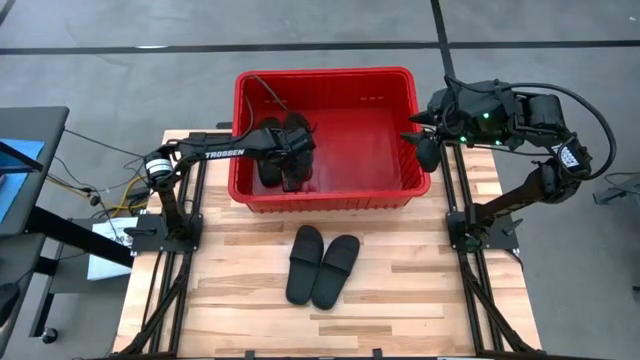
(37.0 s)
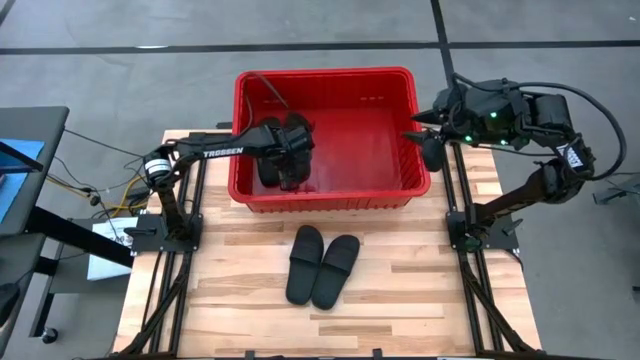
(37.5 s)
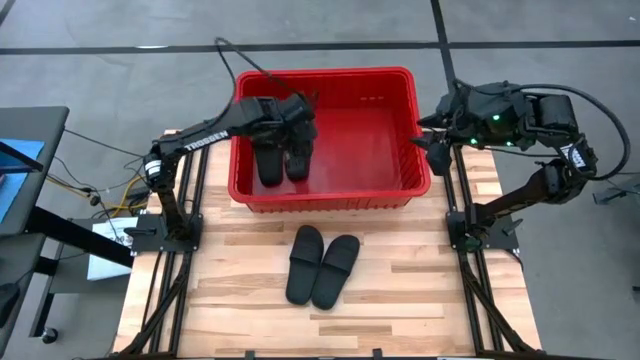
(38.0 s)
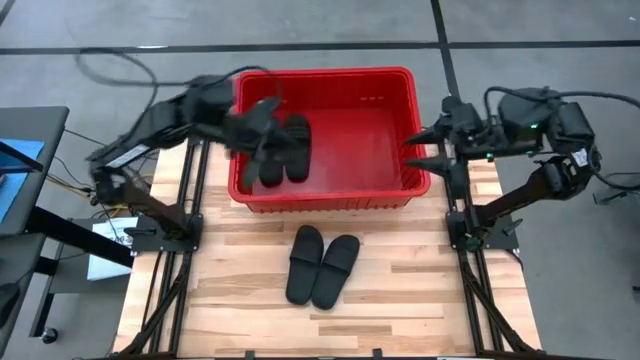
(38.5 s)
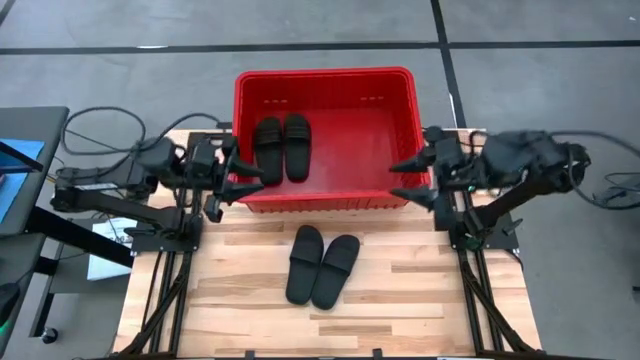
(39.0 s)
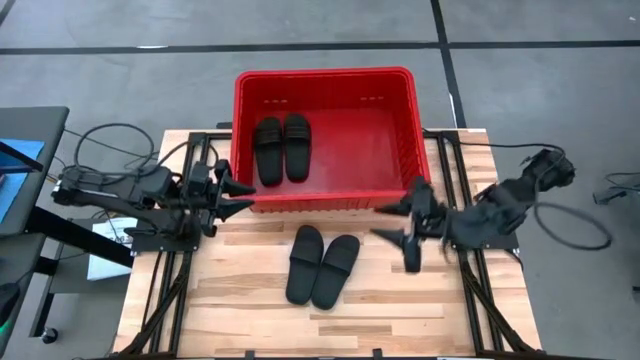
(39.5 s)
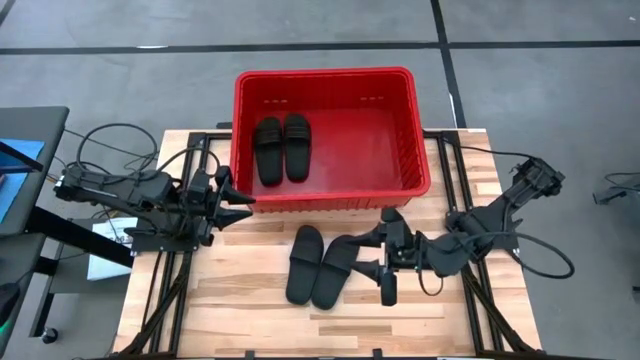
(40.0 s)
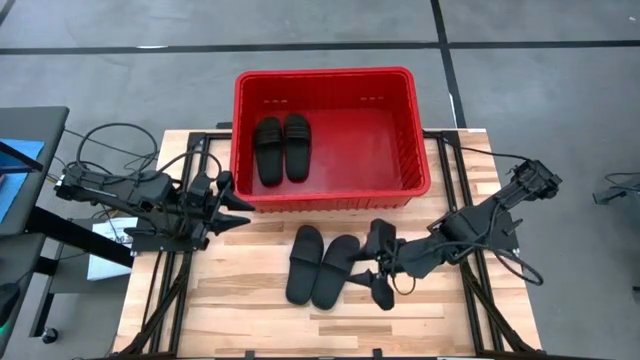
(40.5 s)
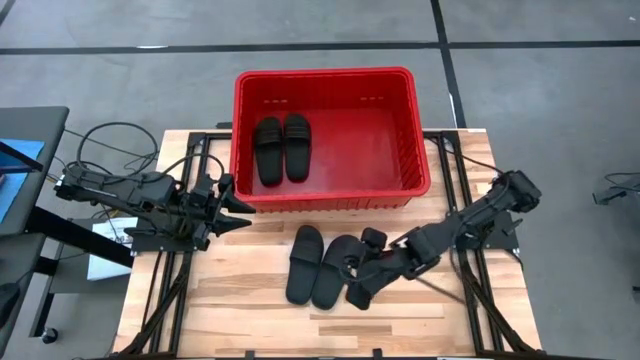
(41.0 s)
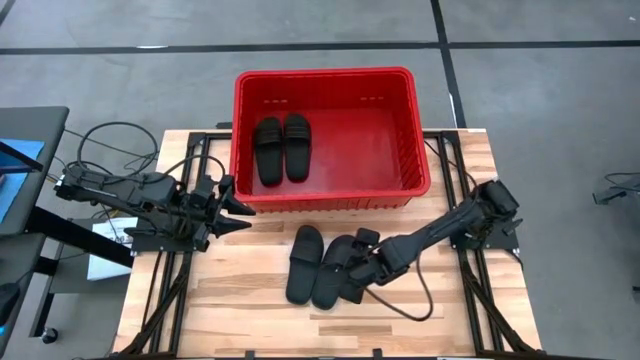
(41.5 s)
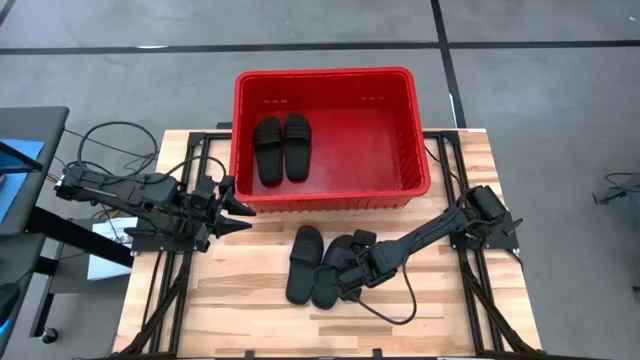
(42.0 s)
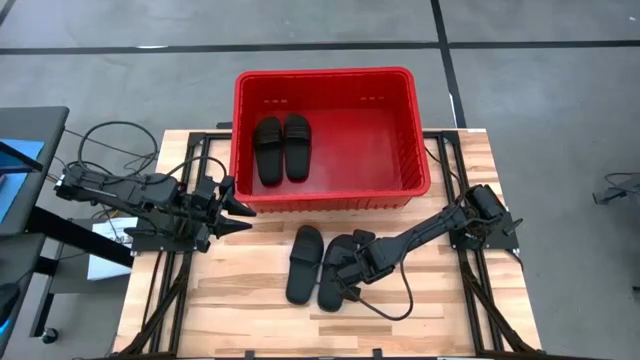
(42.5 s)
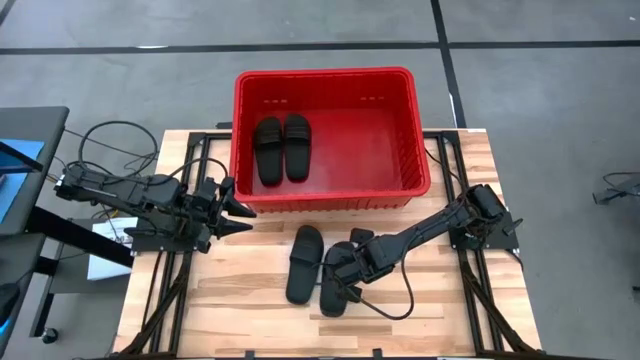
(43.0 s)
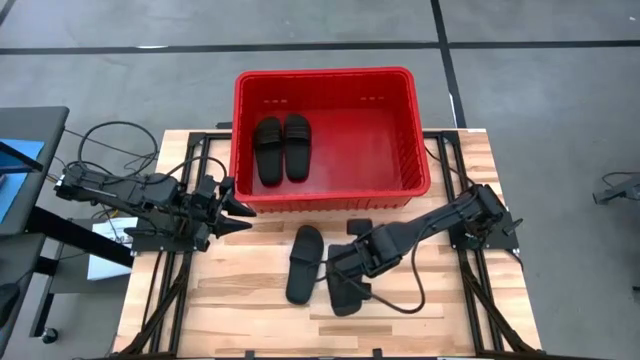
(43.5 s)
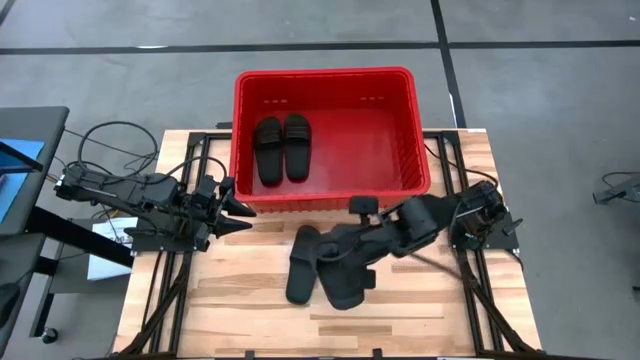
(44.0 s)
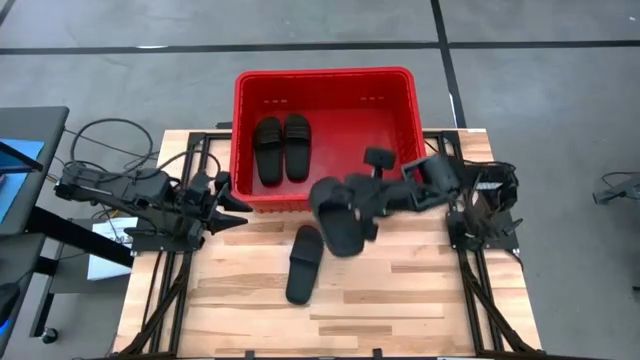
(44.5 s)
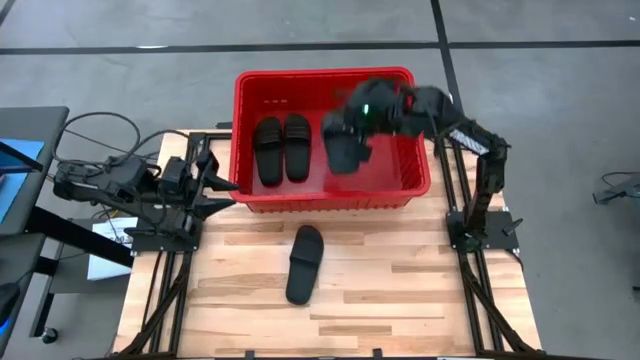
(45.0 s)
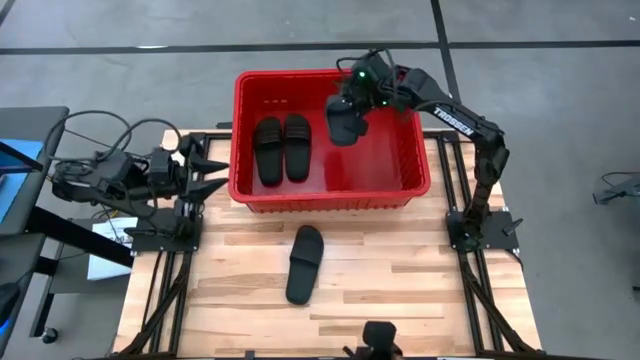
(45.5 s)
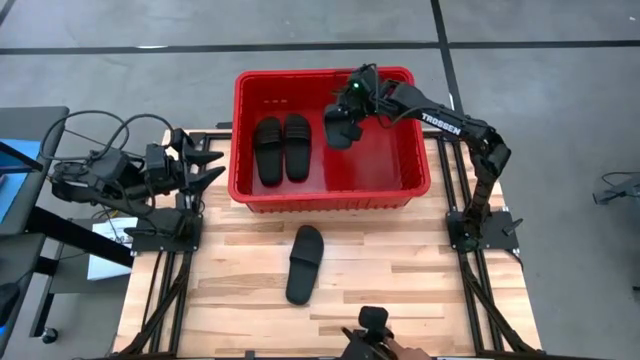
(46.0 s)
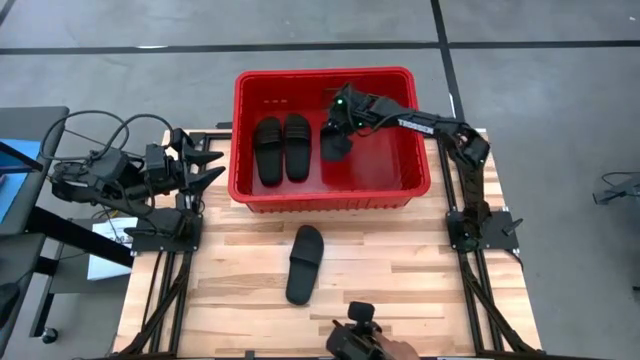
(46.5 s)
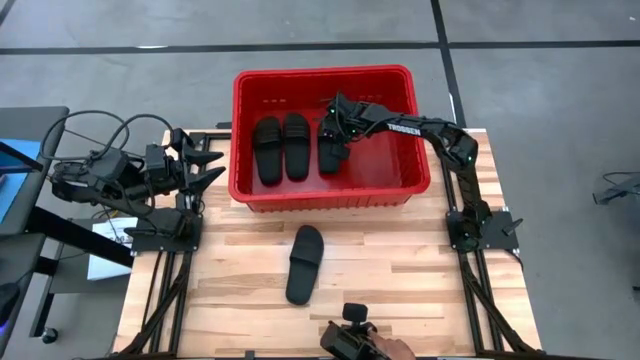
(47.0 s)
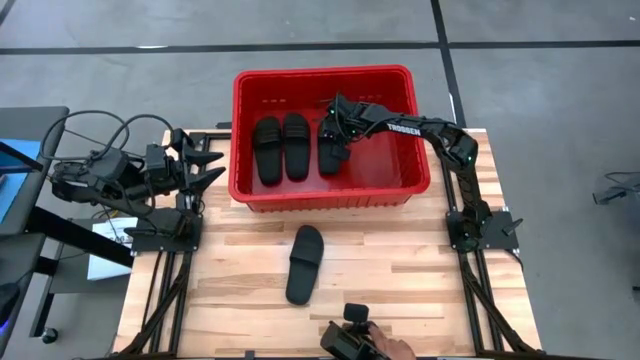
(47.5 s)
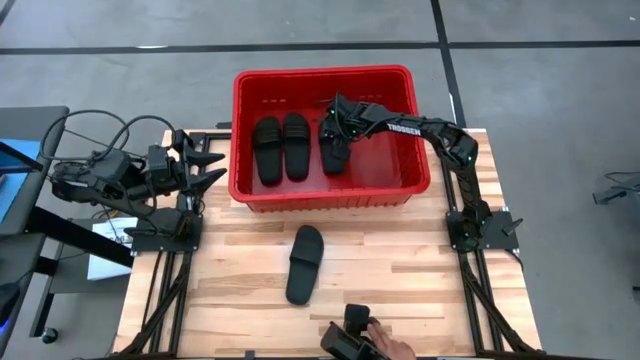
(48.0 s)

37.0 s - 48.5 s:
Task: Pick and place slides into bin
Put the black slide into the red container

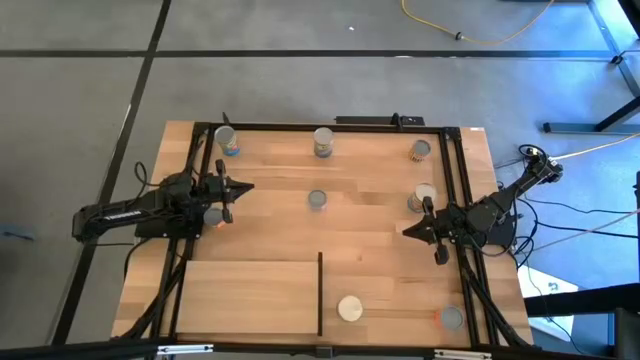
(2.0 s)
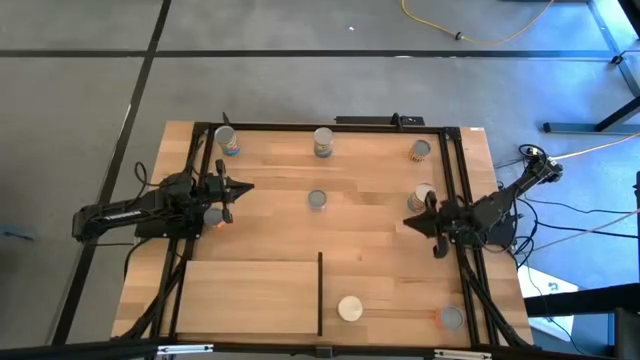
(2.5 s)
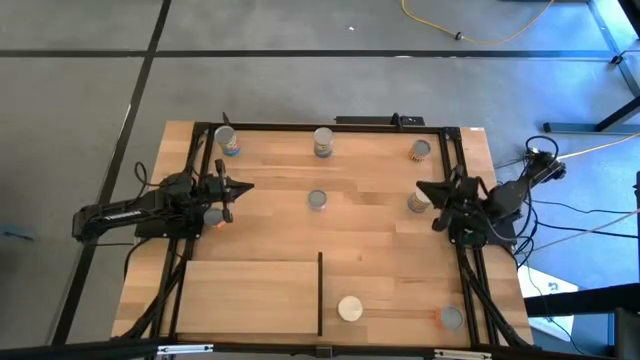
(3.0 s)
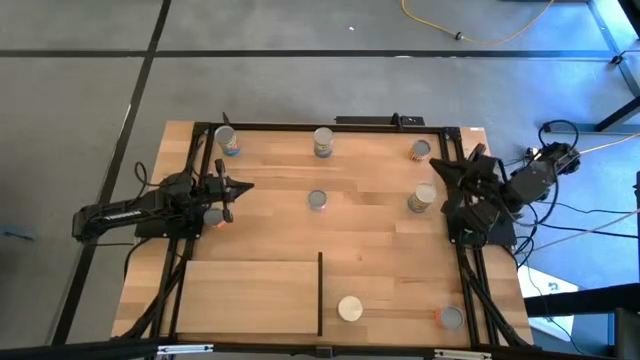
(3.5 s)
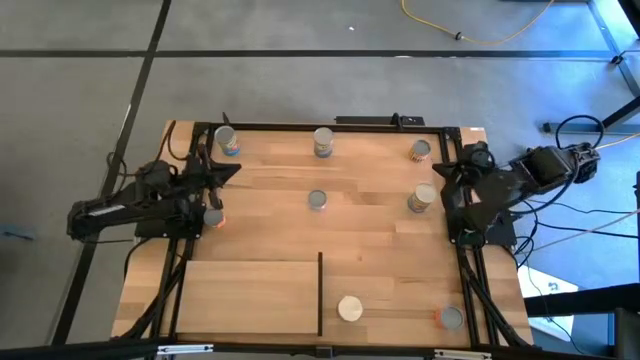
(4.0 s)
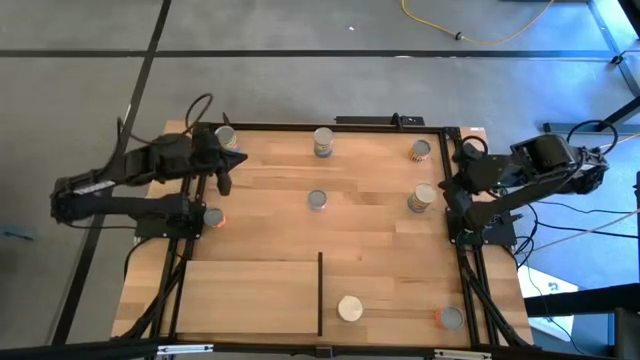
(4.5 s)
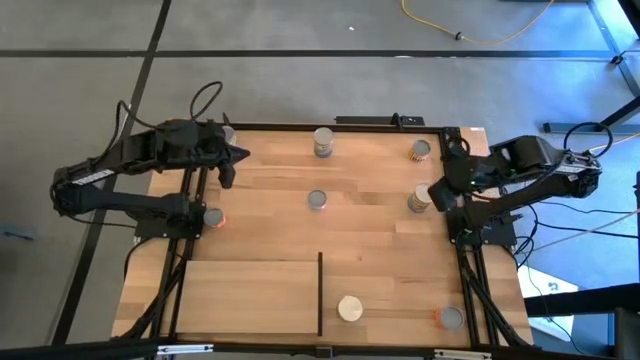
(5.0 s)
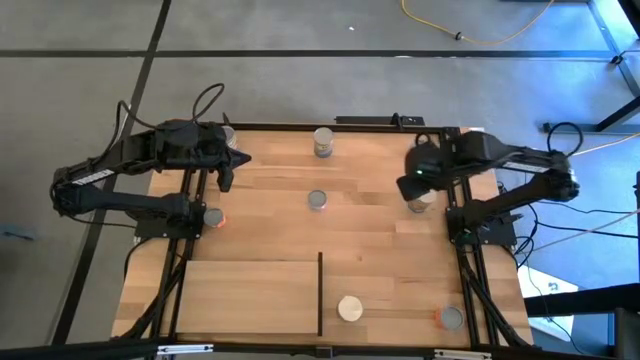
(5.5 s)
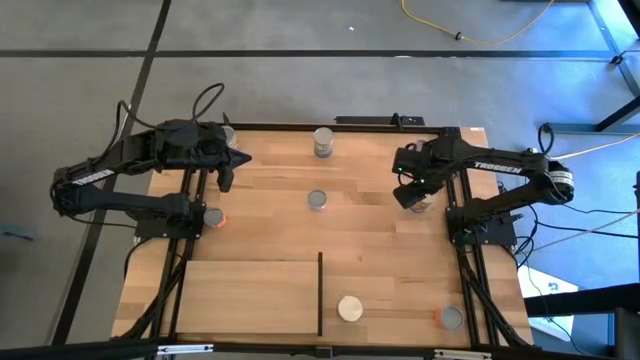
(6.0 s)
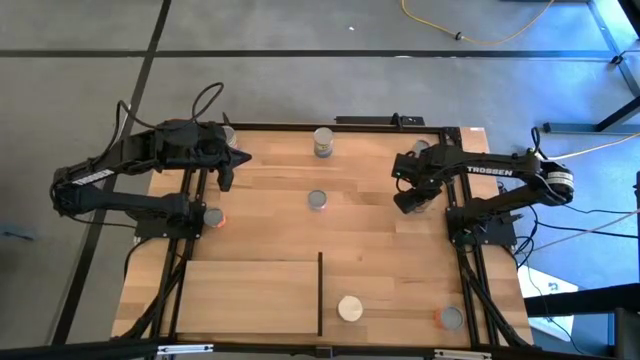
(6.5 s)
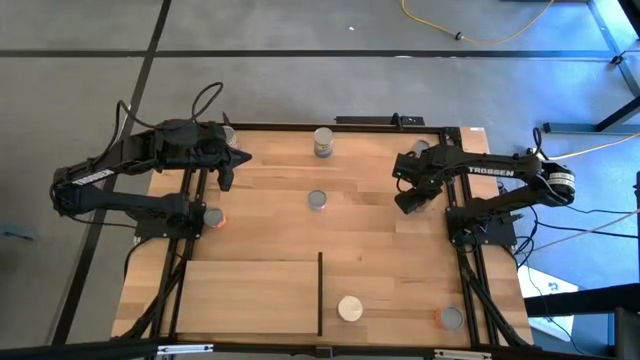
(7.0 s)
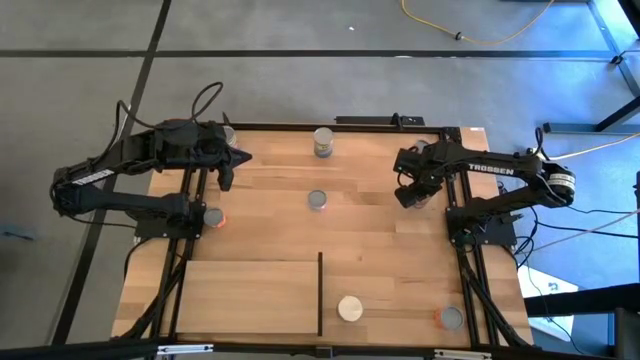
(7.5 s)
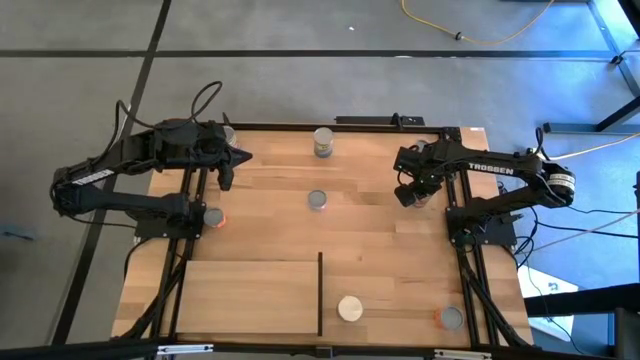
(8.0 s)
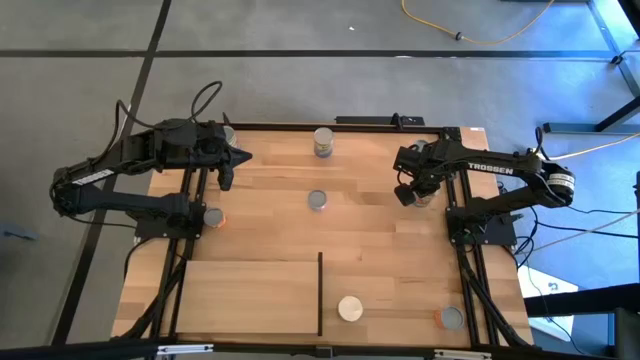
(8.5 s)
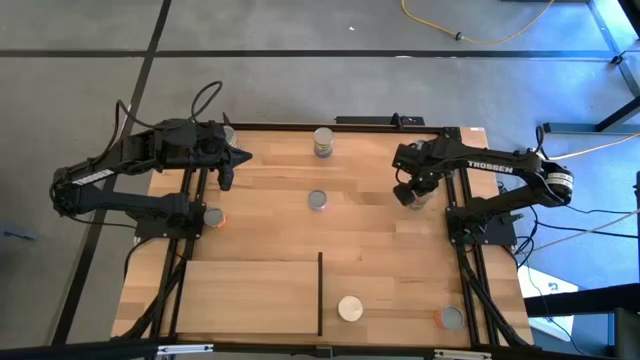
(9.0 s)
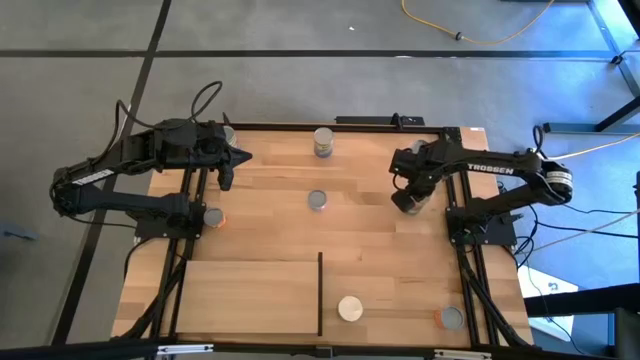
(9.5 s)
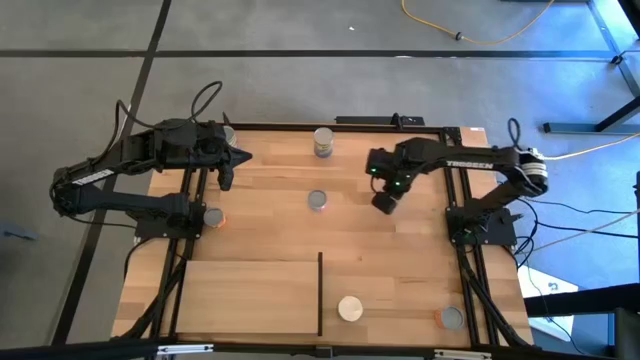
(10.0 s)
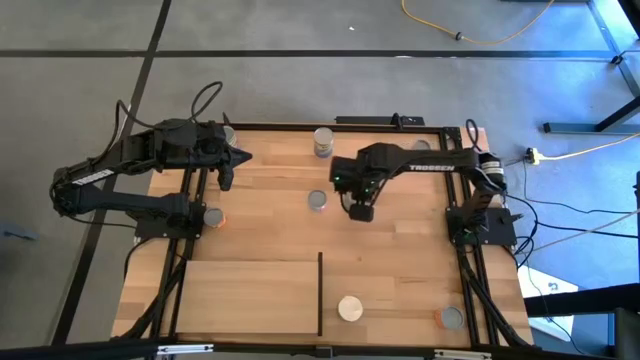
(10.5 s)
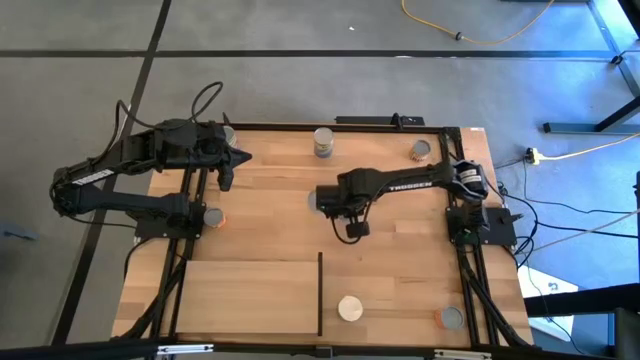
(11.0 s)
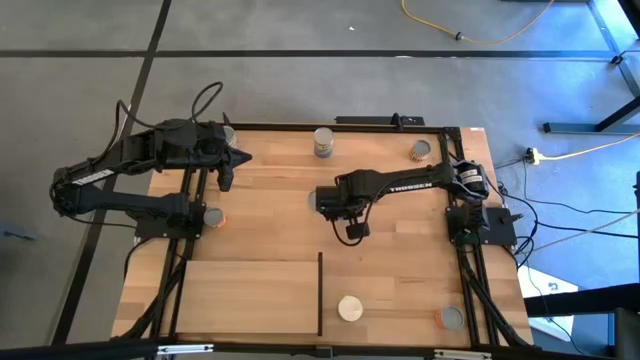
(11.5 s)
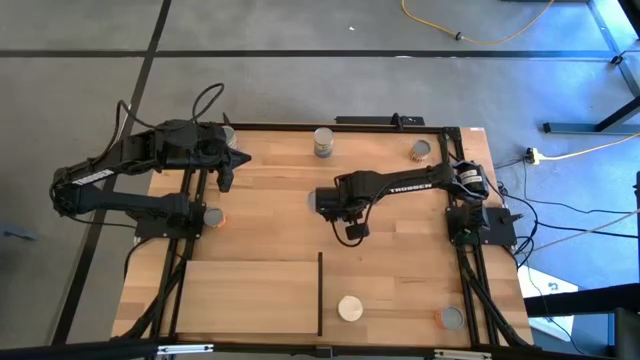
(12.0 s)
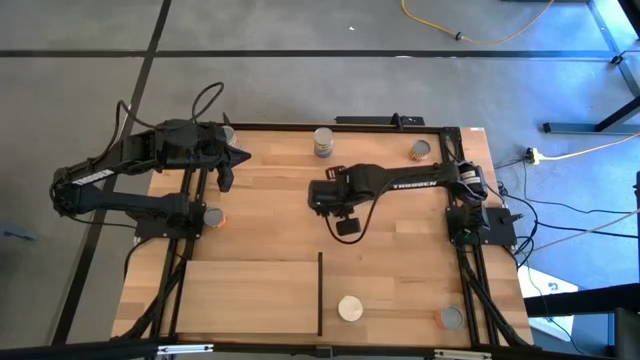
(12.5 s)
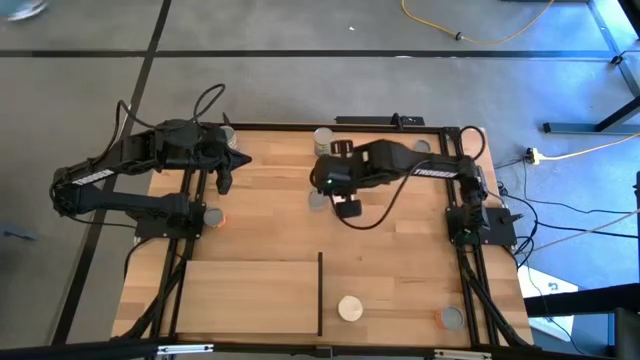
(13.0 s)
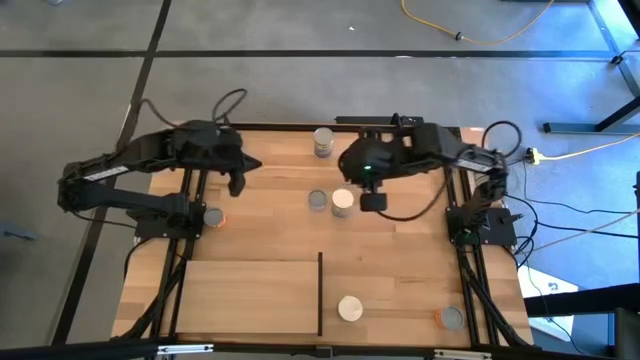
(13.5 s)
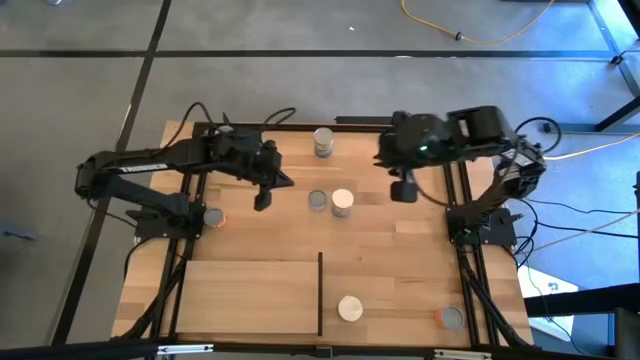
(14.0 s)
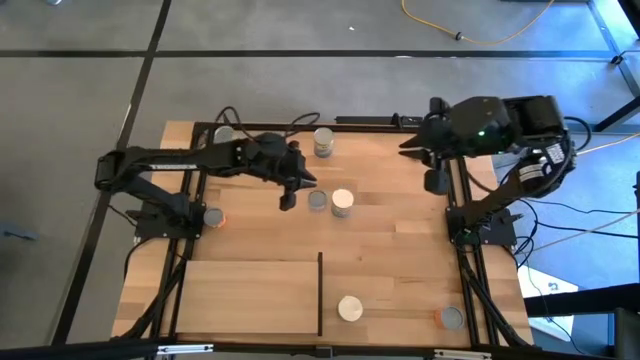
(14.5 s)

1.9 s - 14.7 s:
Task: Pick and place cans onto a shelf
Put the canned tomatoes on the shelf
